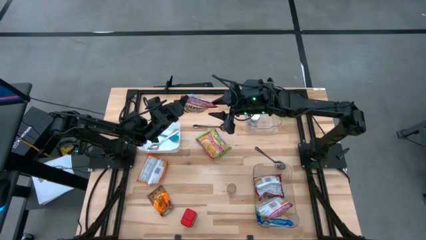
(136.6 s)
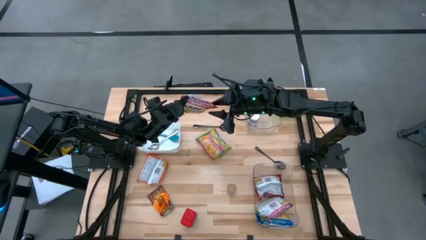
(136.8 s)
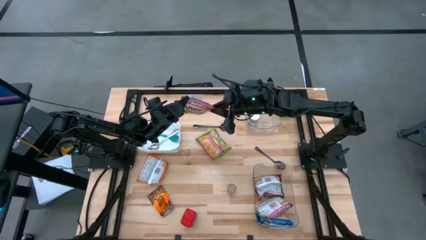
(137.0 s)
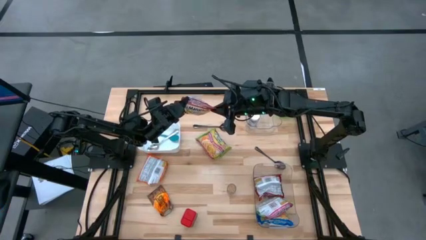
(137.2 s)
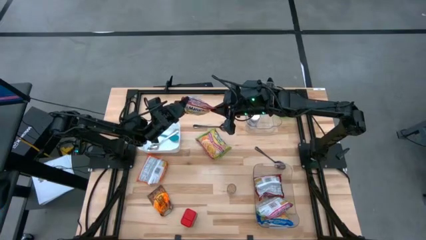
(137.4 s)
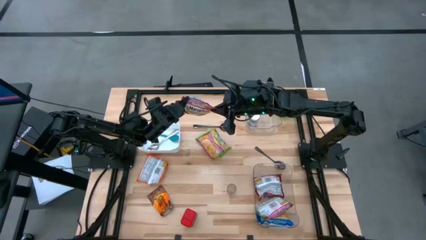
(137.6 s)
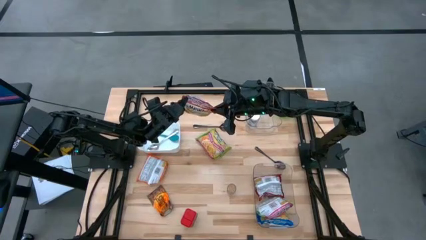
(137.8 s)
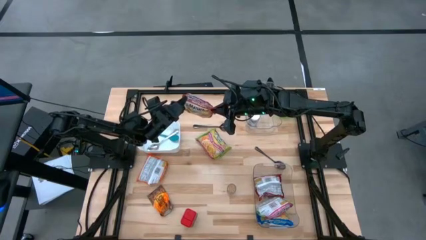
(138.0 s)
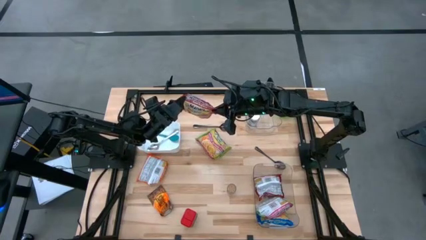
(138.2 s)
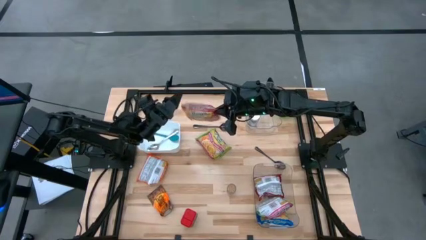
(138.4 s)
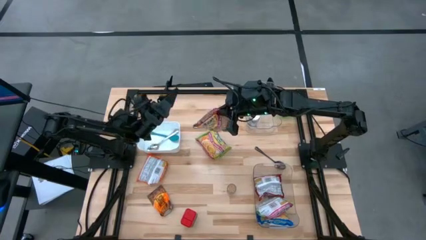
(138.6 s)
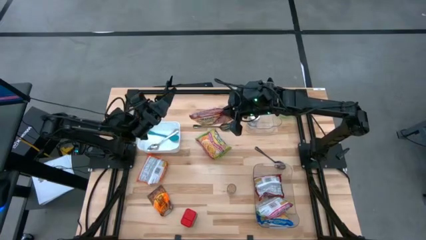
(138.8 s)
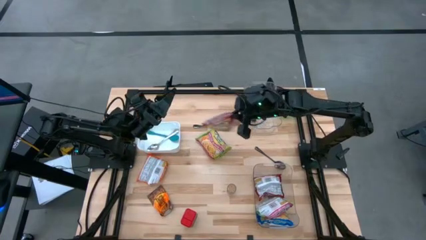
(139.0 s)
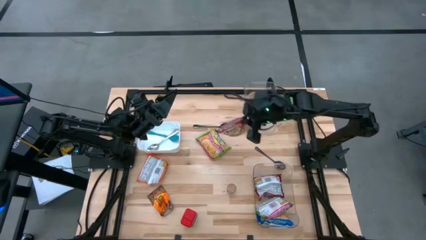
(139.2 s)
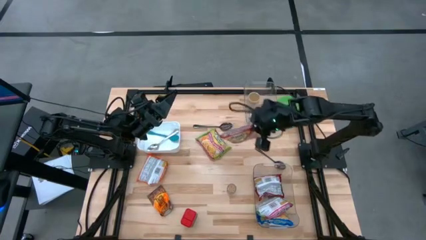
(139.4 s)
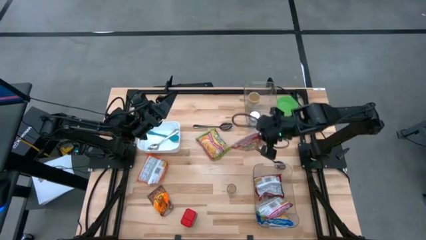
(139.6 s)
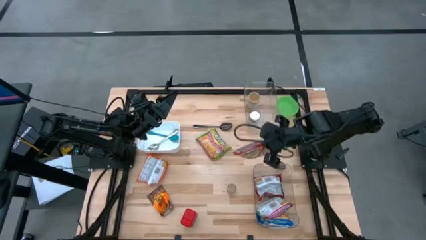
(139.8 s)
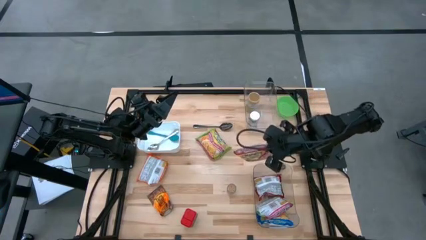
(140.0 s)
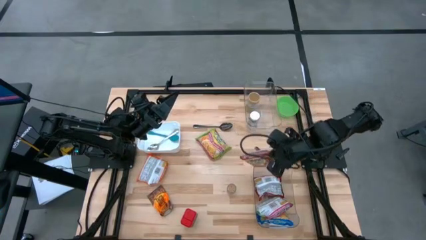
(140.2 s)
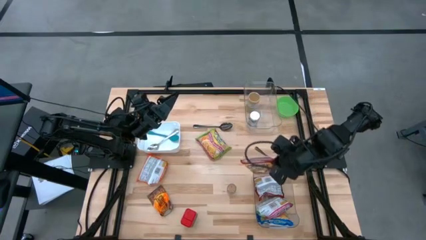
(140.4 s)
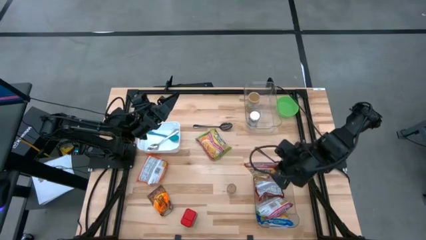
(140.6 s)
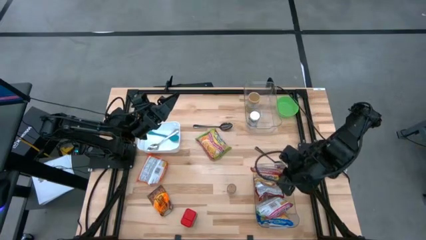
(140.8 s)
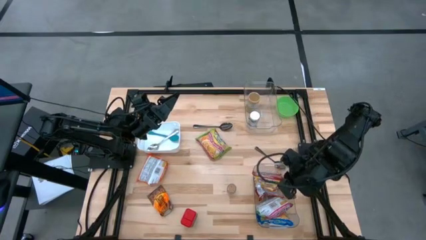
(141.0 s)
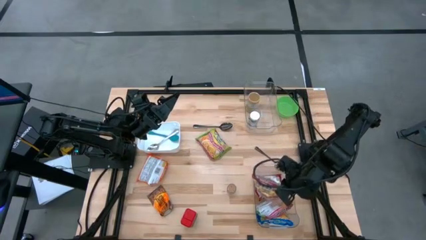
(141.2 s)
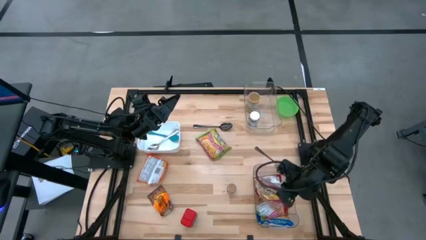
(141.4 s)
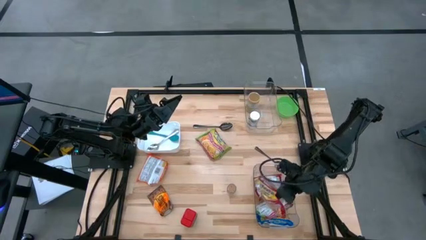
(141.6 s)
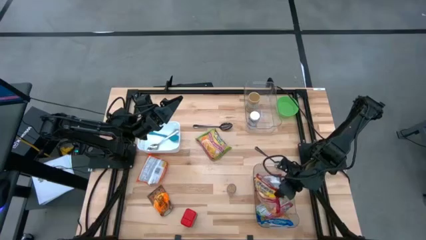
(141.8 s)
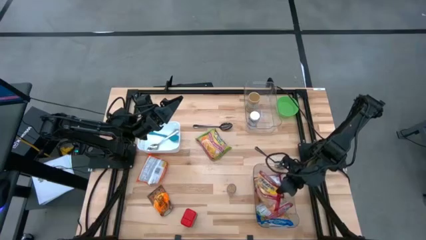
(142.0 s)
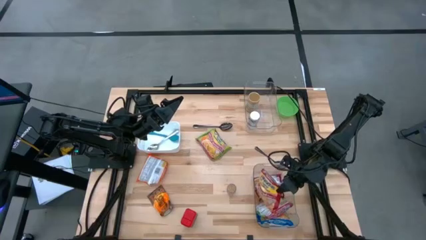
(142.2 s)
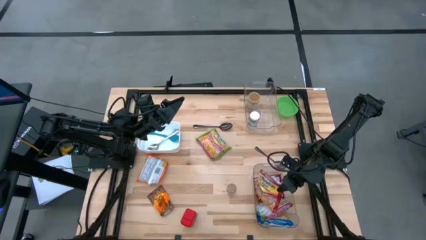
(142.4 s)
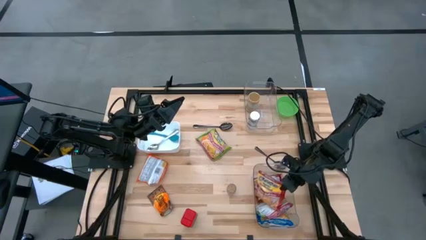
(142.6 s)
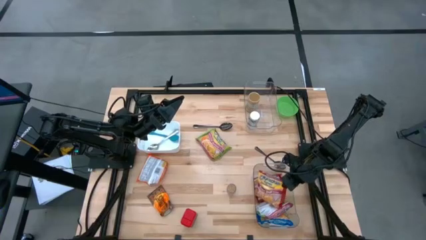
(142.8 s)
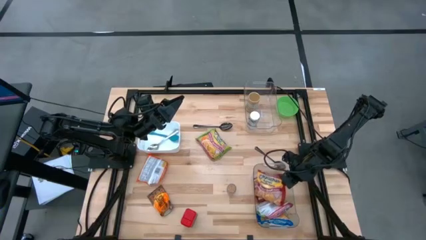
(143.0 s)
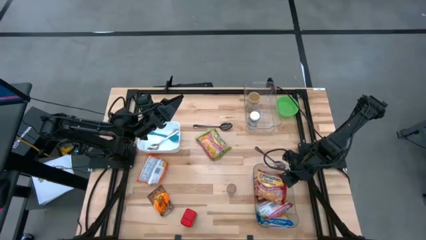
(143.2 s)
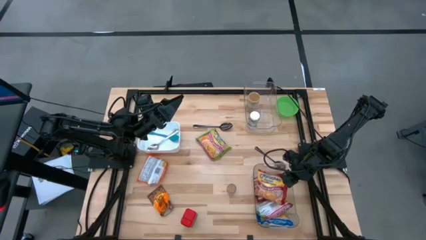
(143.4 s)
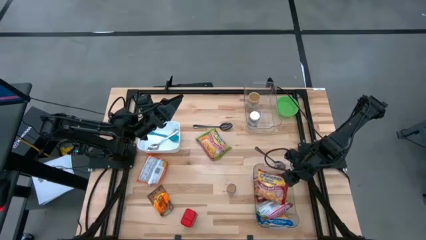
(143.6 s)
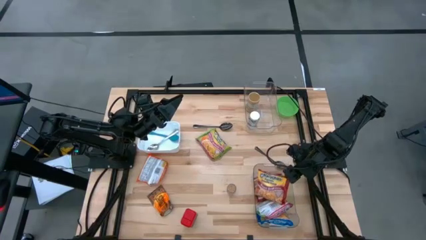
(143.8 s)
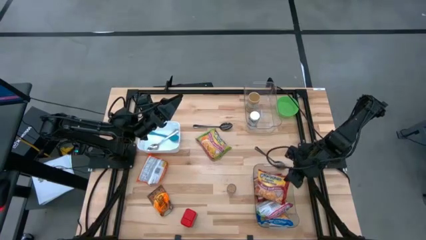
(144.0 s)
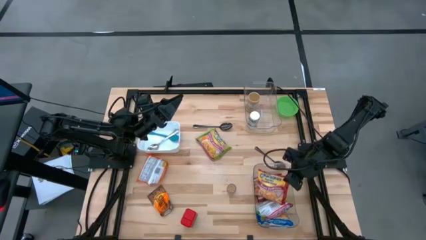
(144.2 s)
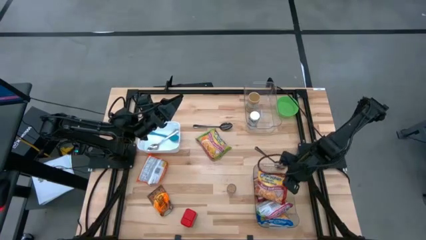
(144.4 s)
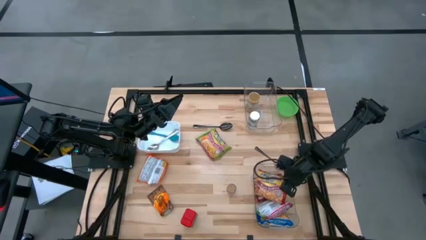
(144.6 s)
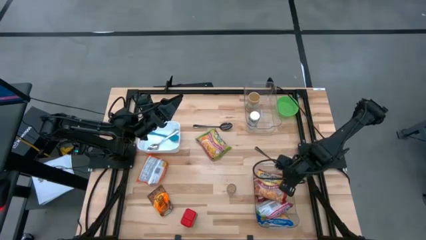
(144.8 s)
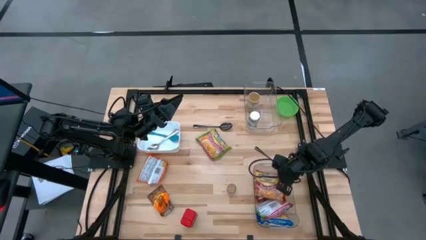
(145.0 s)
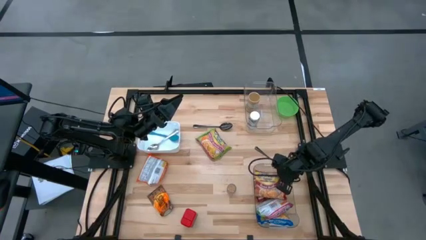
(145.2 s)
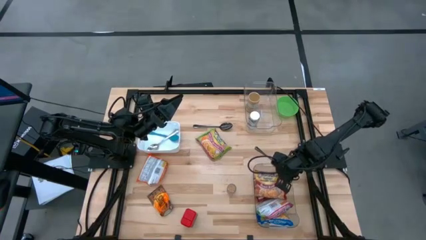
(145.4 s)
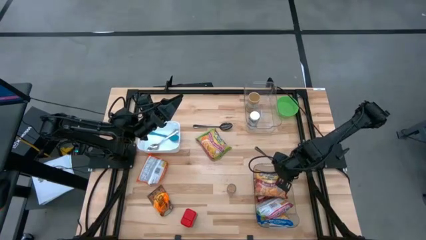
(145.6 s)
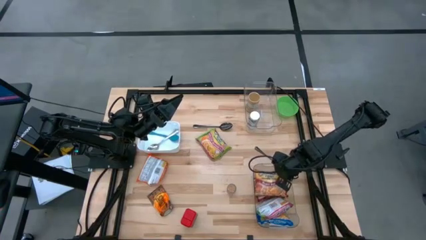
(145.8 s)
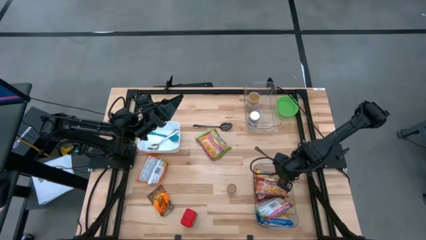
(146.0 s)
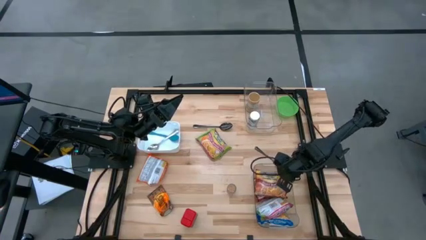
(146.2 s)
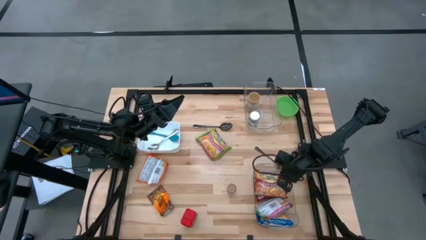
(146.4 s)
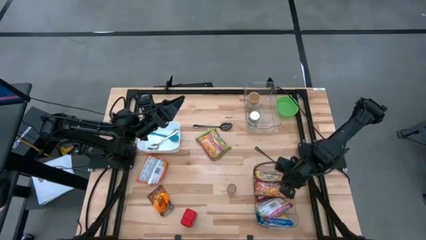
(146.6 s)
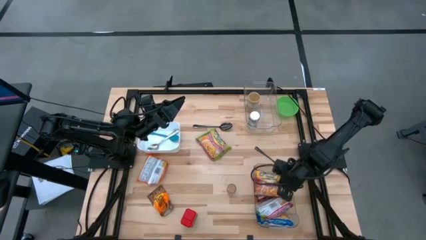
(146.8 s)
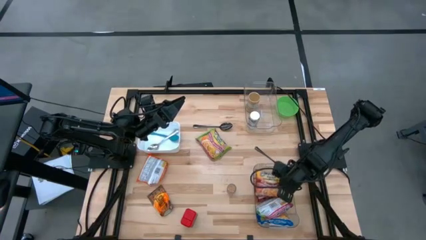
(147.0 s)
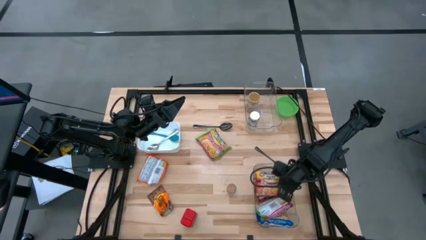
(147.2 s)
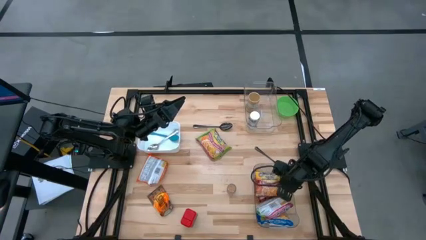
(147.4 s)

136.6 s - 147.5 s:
Task: Pick & Place Food Item
Put the red noodle pack into the bottom transparent bin

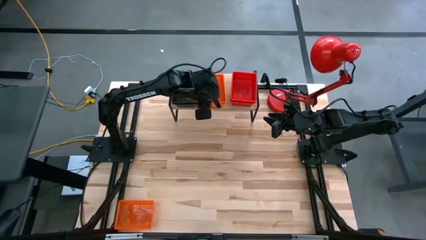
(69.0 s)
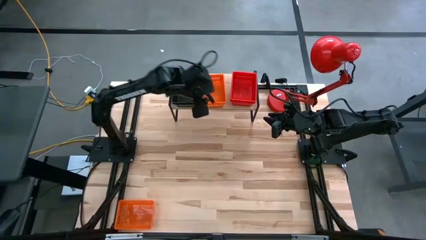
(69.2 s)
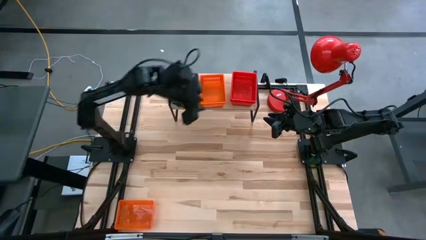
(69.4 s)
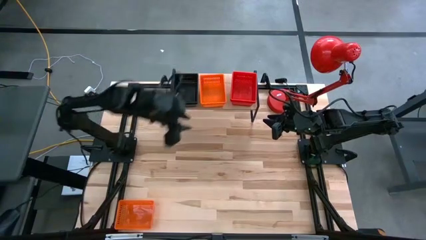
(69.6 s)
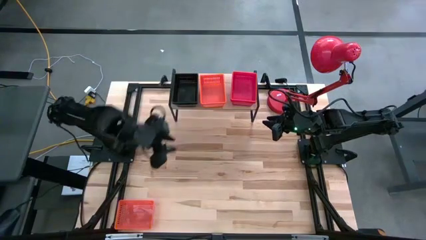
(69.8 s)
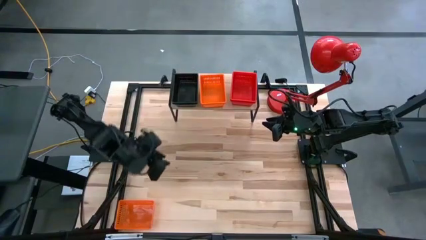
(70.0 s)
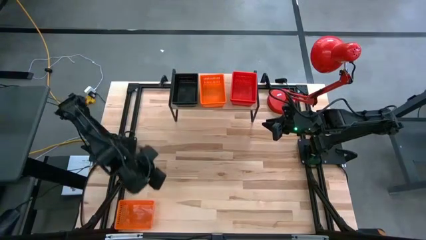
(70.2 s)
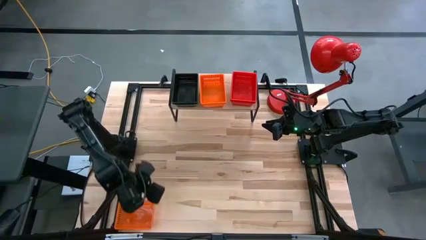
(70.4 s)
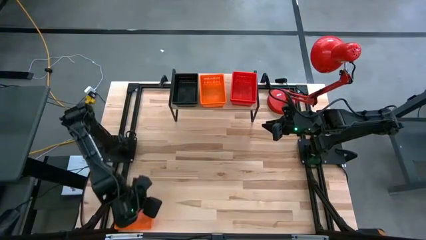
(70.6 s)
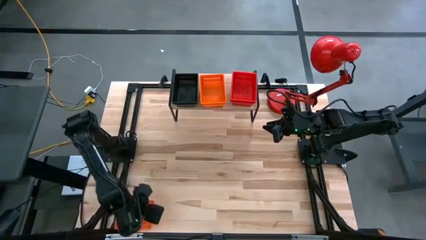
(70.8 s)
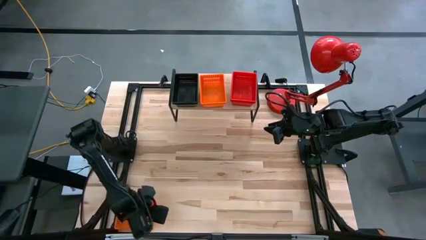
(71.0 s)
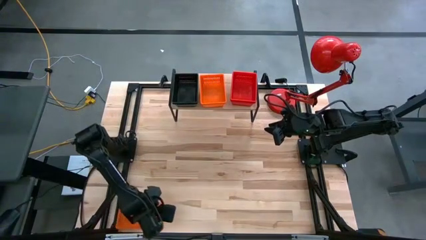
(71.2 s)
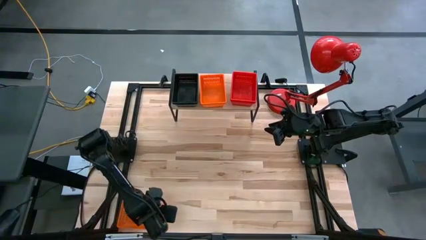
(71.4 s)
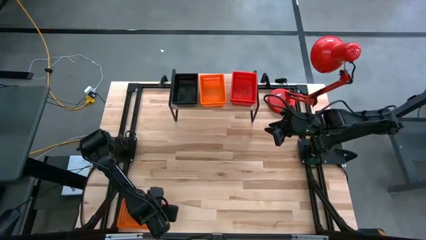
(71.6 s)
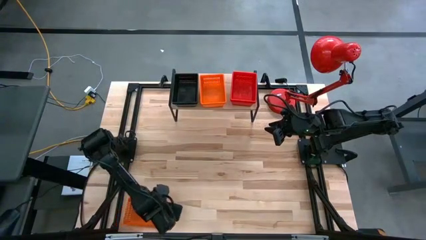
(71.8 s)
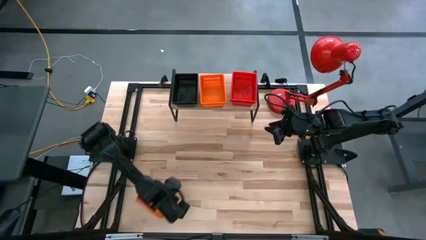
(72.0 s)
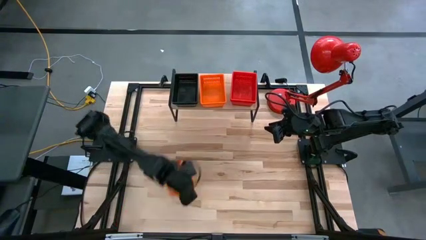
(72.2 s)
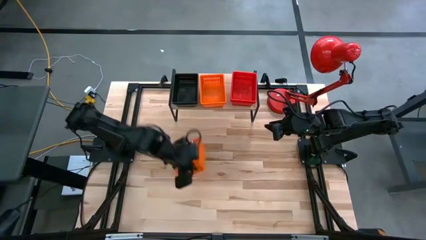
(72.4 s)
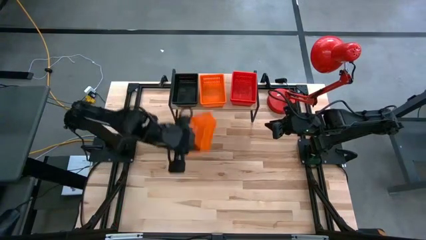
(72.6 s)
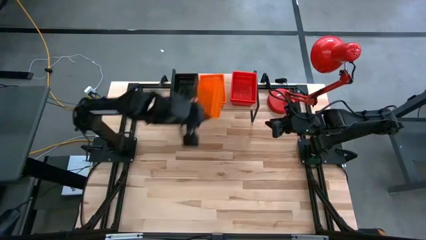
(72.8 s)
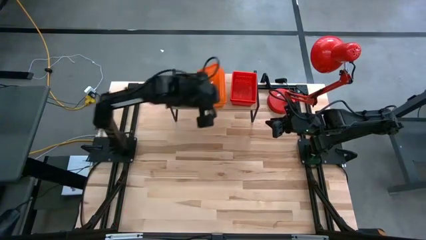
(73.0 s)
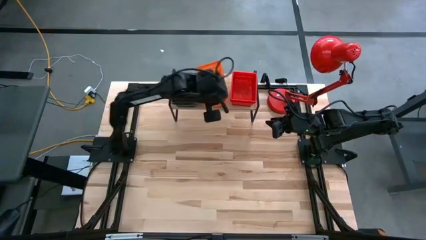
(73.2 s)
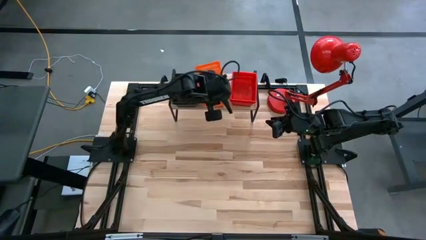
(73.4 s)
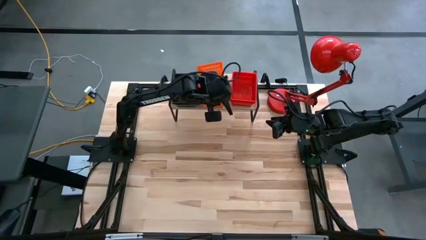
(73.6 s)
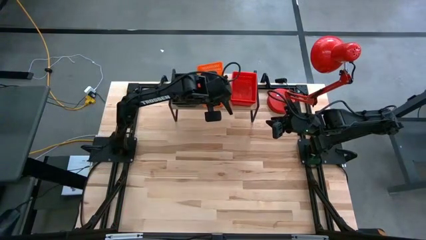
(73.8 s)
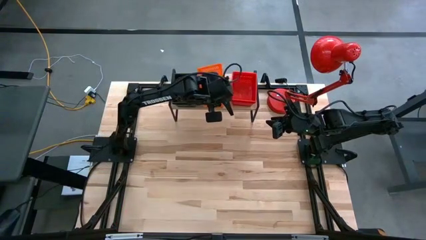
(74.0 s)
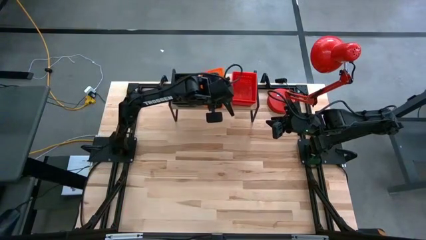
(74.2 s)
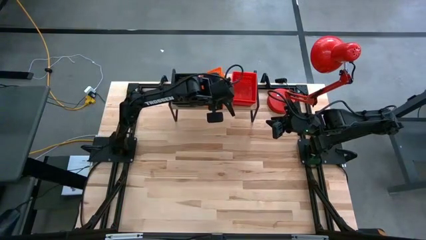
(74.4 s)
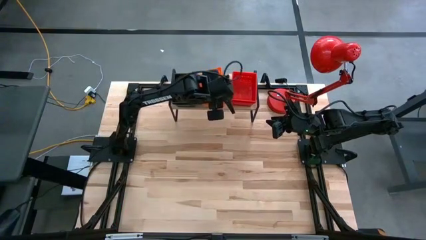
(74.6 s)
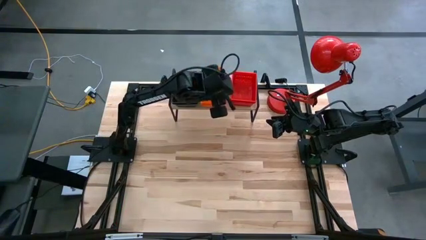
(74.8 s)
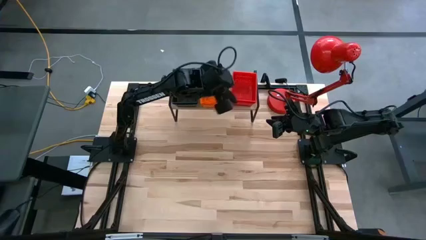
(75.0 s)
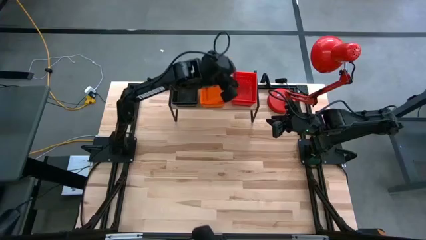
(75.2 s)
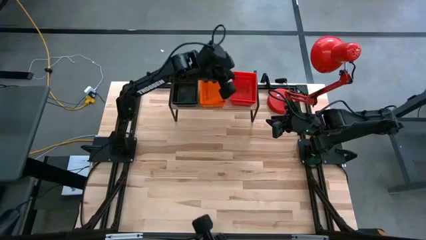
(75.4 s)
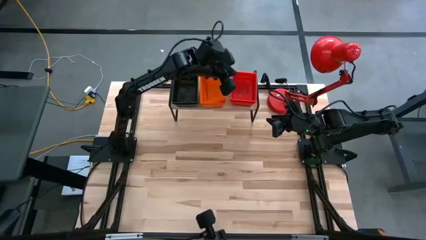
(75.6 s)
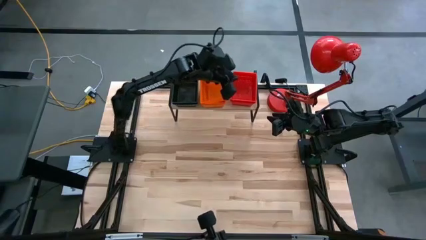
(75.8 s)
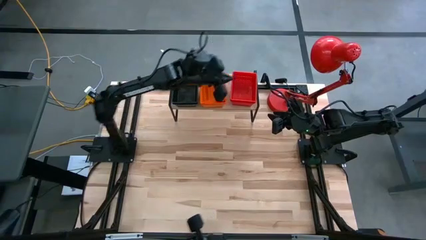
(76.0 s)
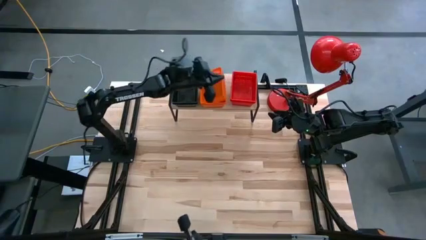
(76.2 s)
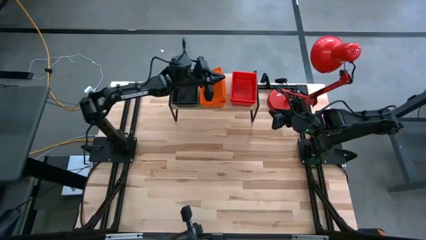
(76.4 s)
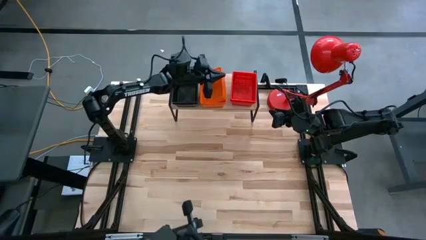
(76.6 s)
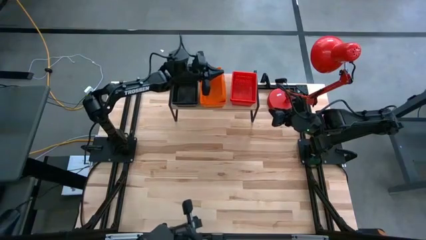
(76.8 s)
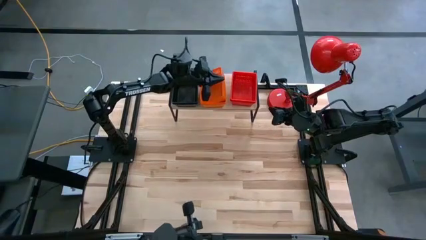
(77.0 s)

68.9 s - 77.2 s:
Task: Stack baskets on shelf by color
Stack the orange basket on top of the stacked orange baskets on the shelf
